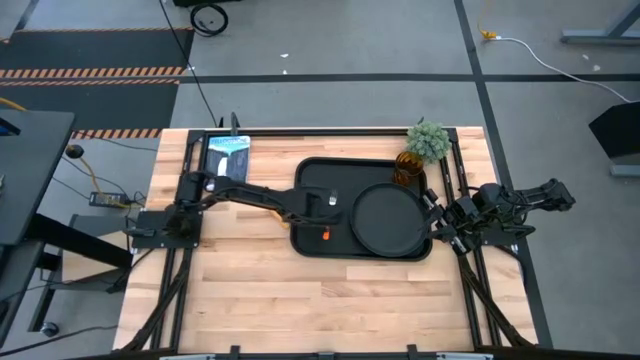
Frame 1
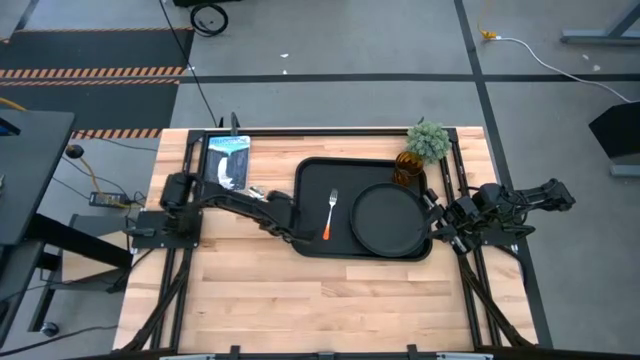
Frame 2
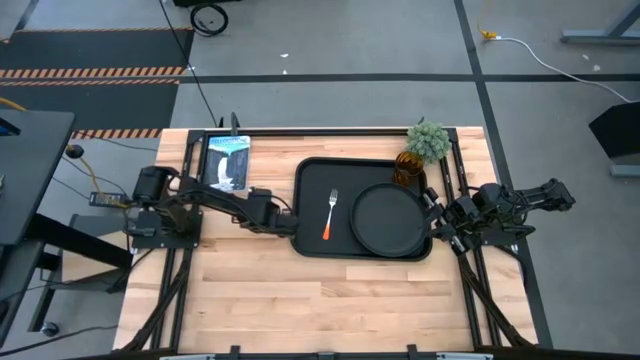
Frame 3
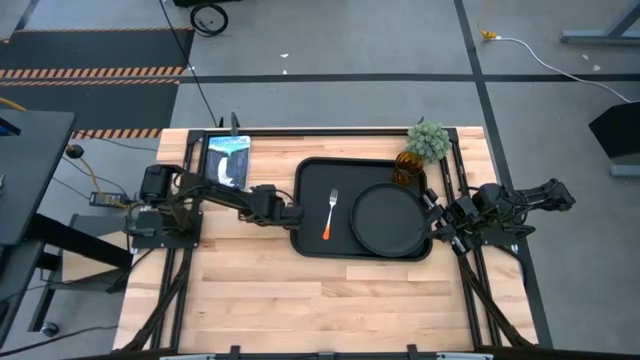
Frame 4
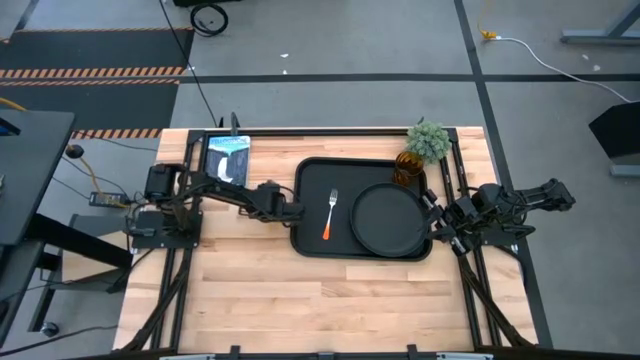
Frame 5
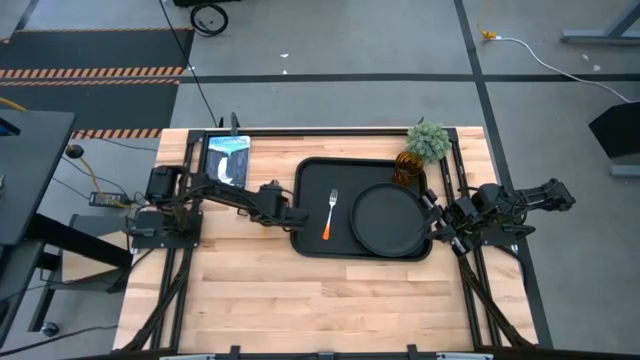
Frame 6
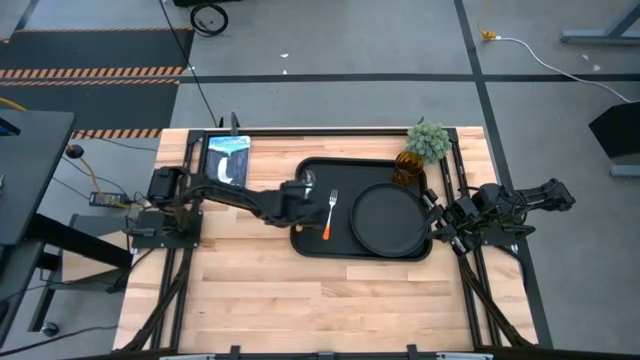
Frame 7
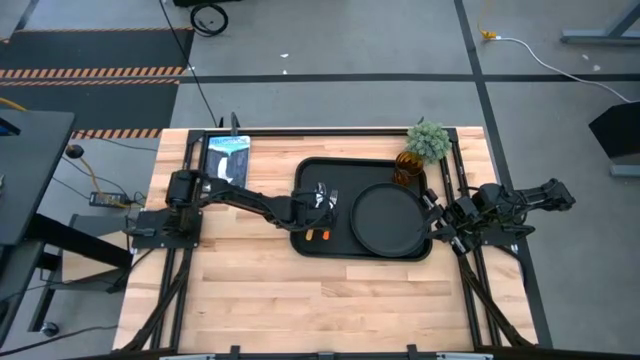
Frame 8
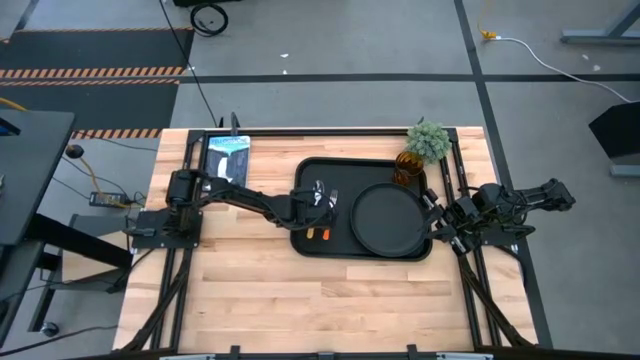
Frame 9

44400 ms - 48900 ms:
Task: Pick and place plate/cup/fork/spoon on tray
Put the yellow spoon to the left of the orange fork on the black table tray

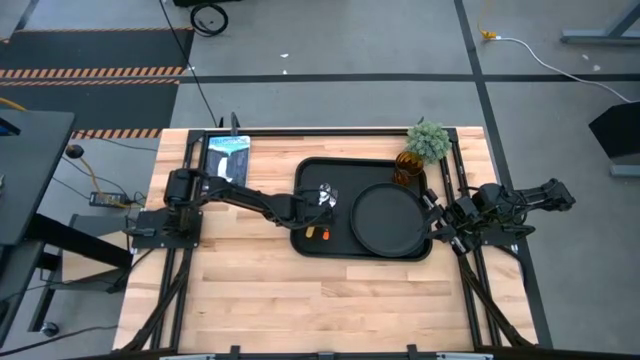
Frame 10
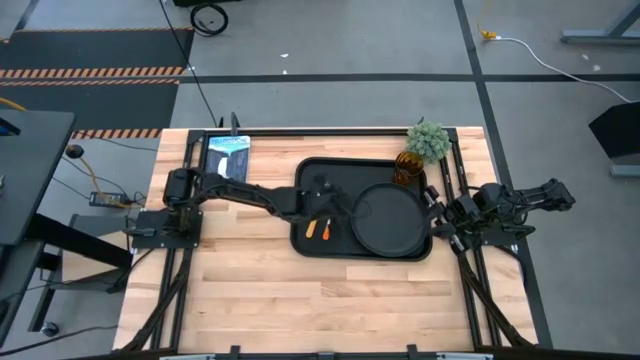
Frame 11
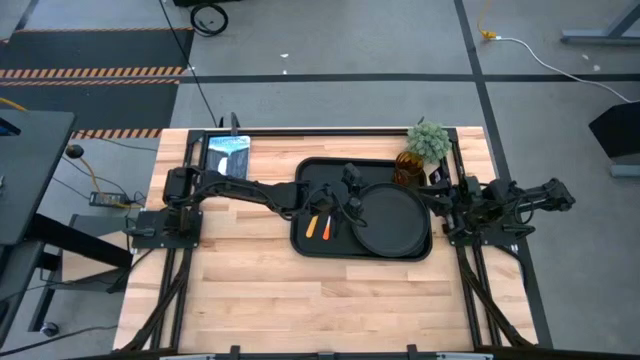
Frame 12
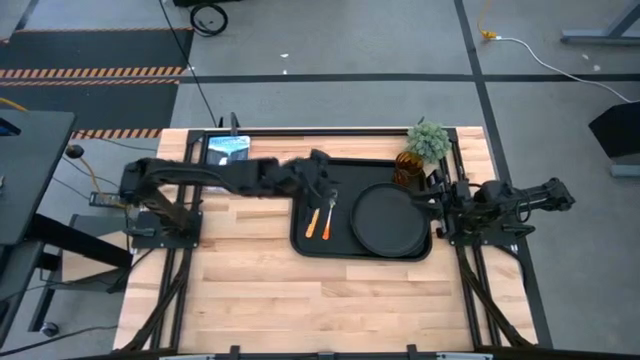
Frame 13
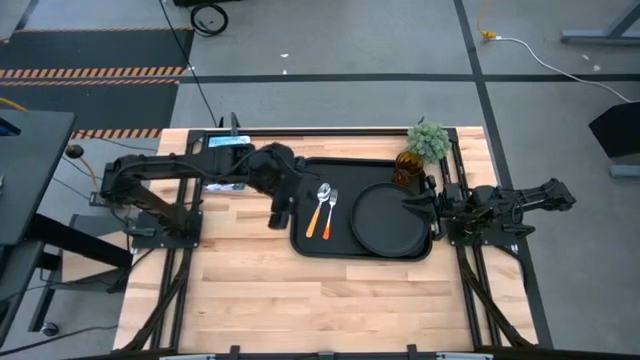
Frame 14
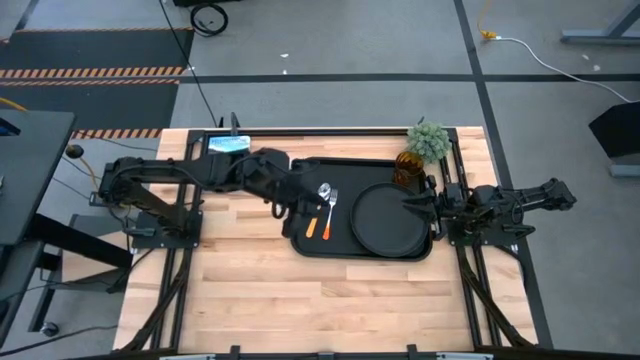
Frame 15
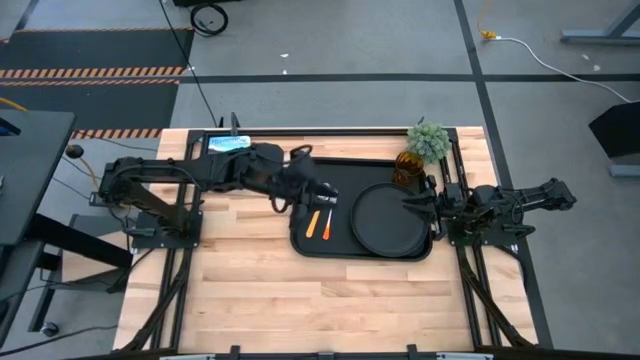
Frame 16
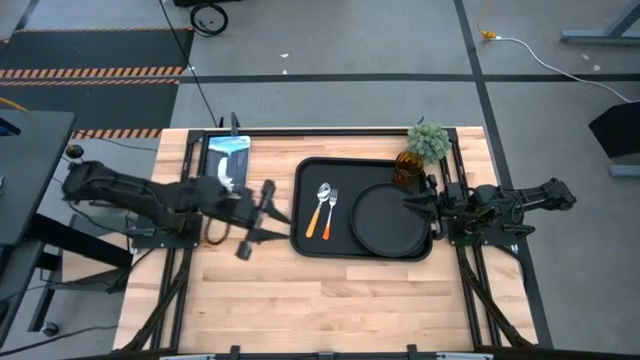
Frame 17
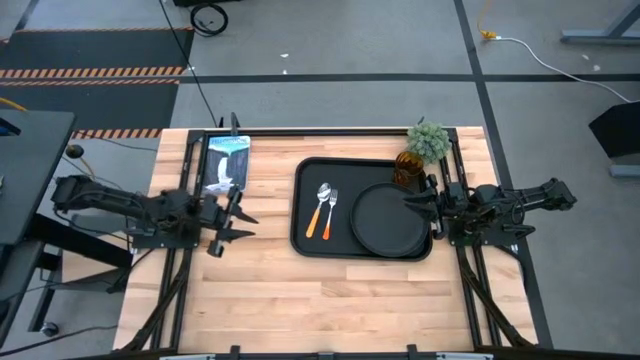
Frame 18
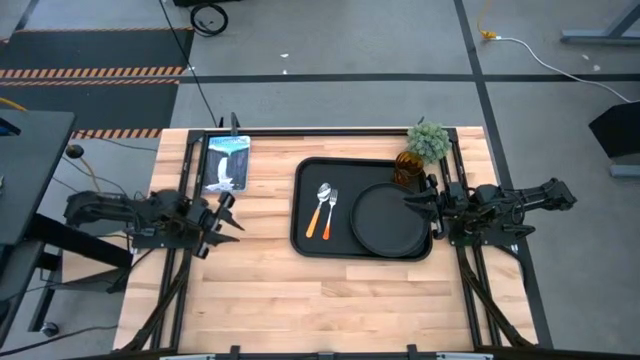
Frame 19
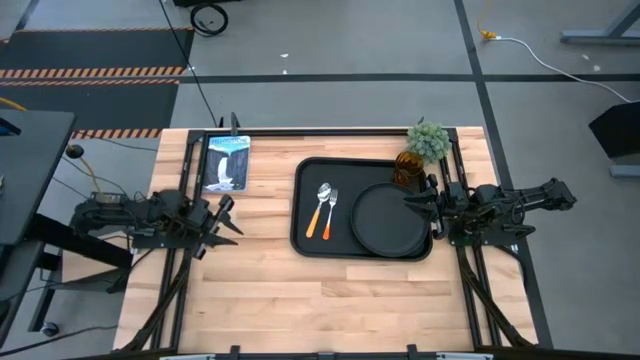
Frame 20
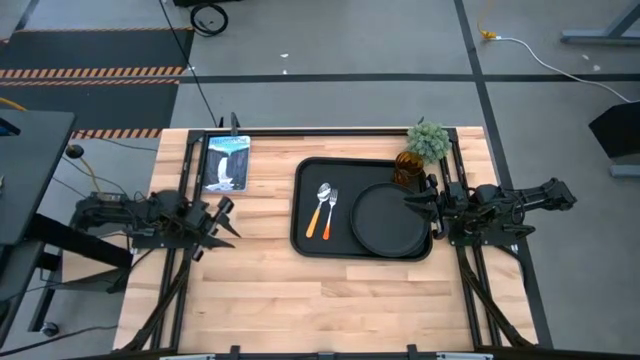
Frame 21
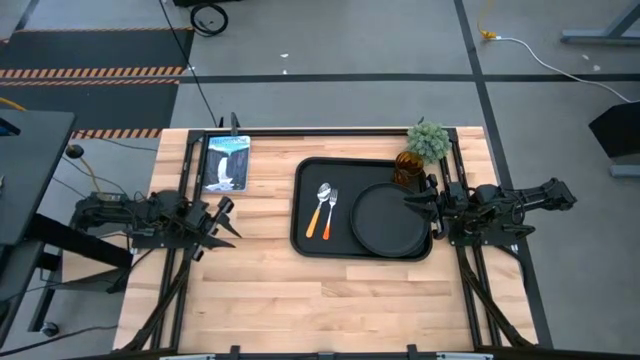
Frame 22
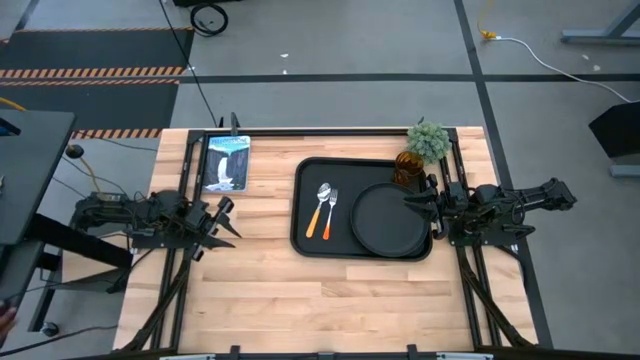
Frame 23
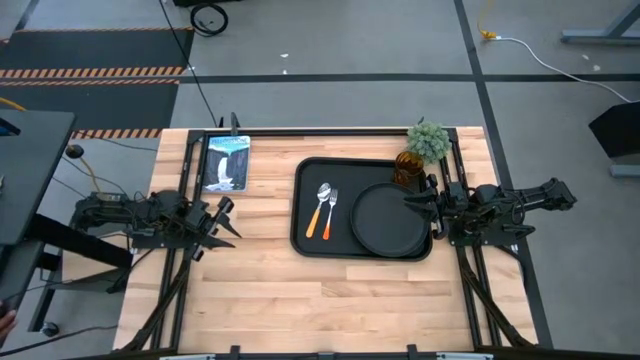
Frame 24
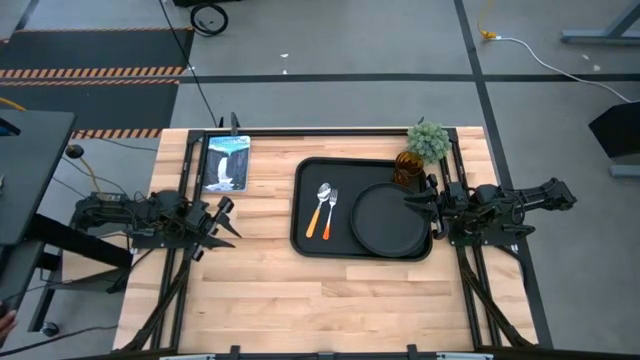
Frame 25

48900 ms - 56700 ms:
Return to Home Position

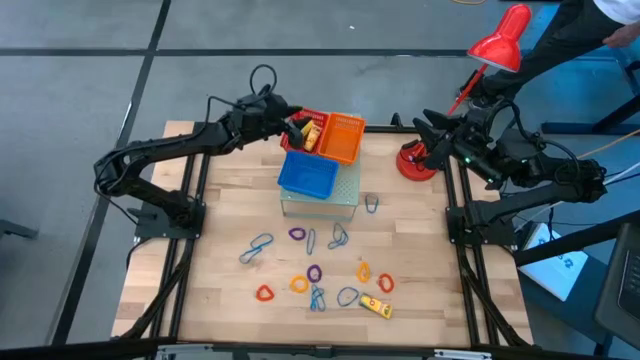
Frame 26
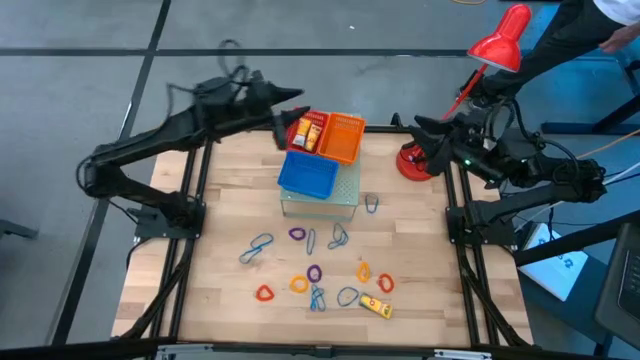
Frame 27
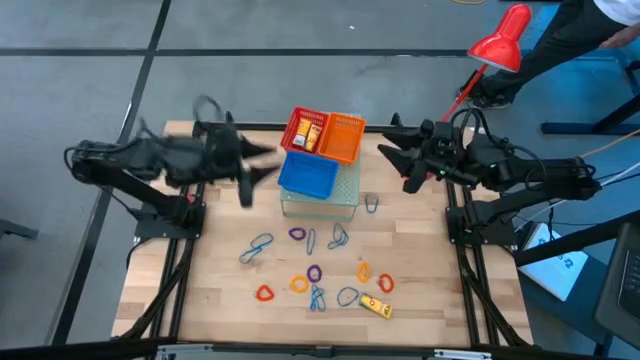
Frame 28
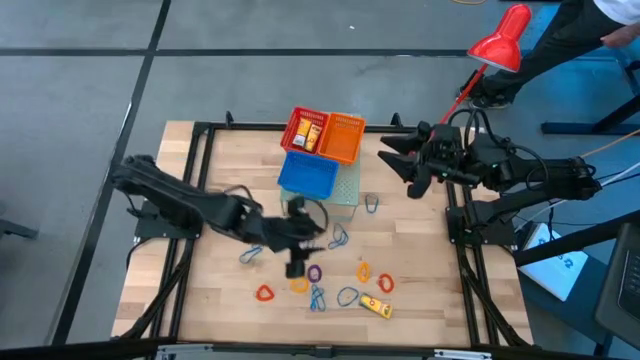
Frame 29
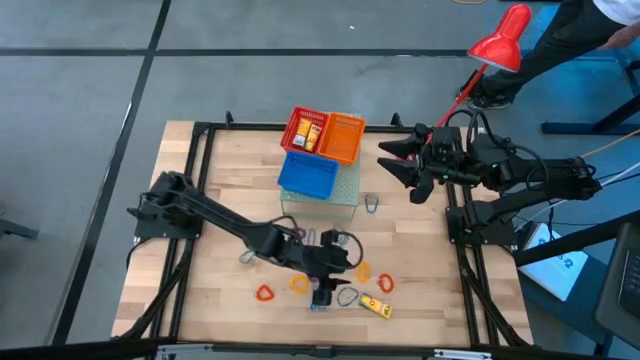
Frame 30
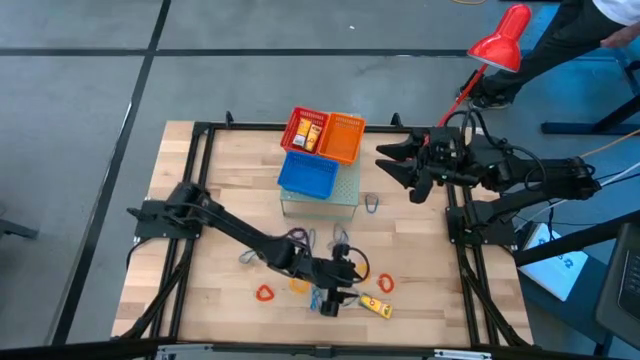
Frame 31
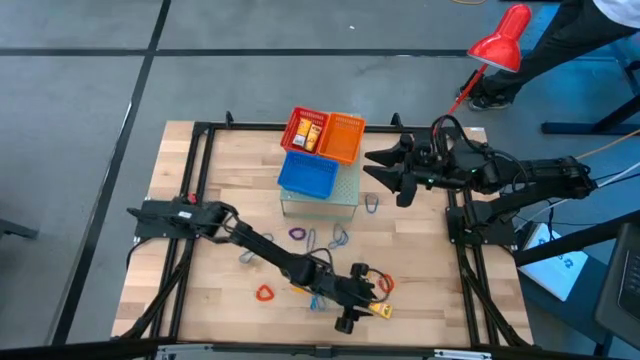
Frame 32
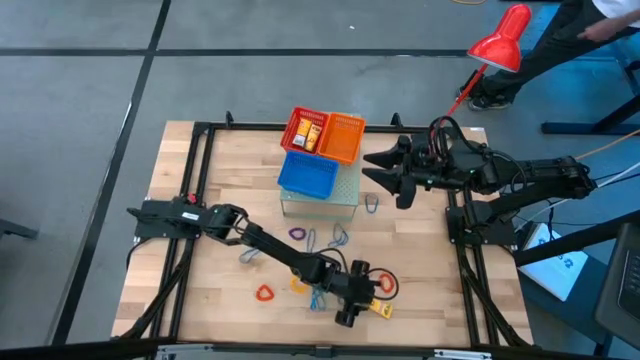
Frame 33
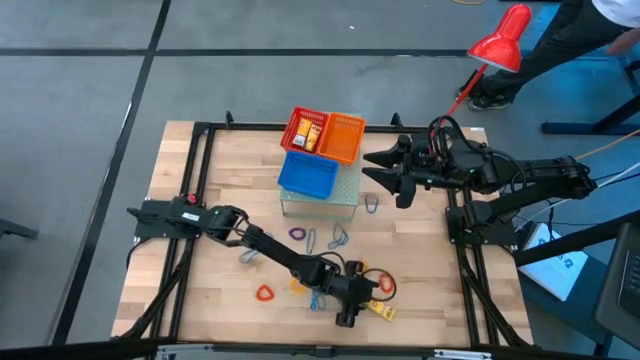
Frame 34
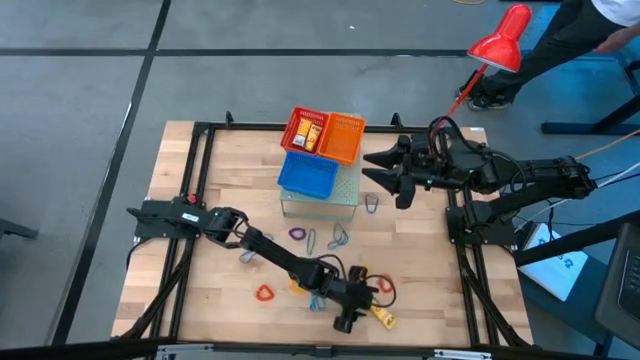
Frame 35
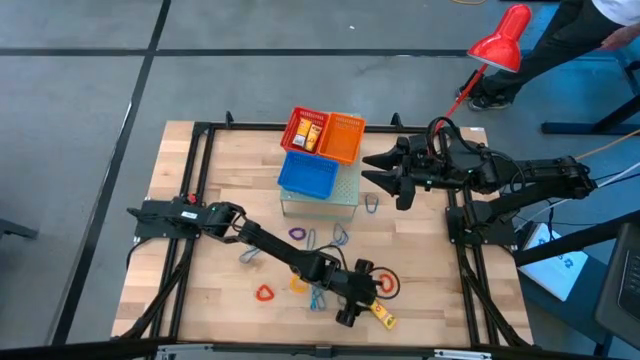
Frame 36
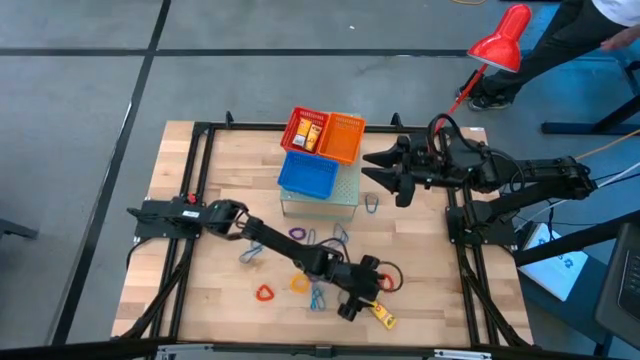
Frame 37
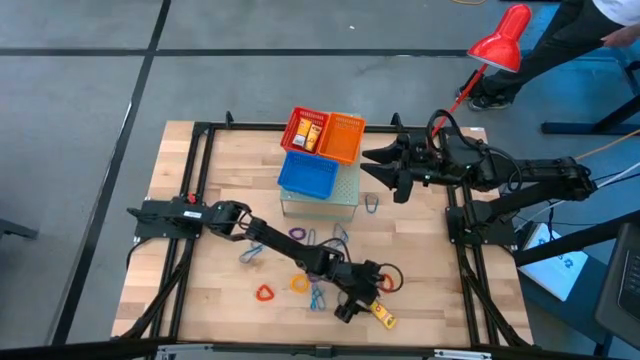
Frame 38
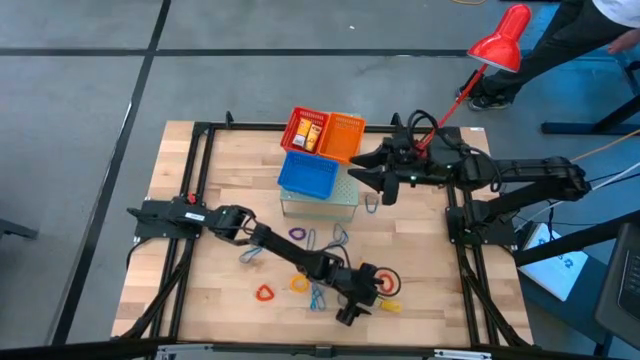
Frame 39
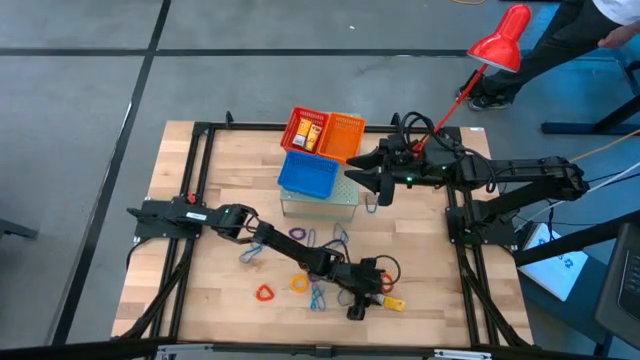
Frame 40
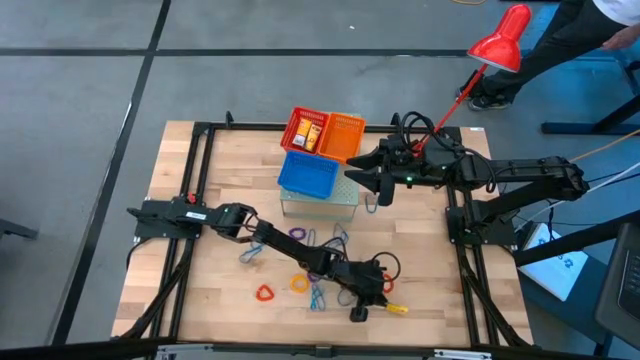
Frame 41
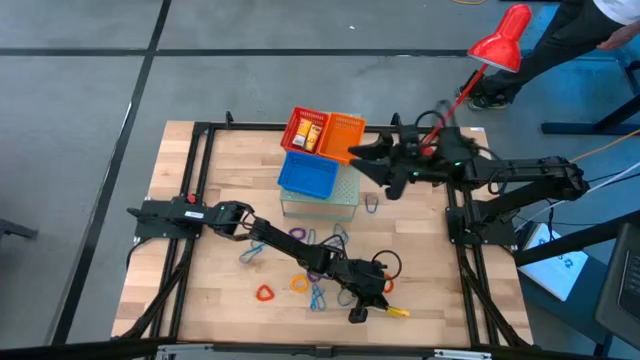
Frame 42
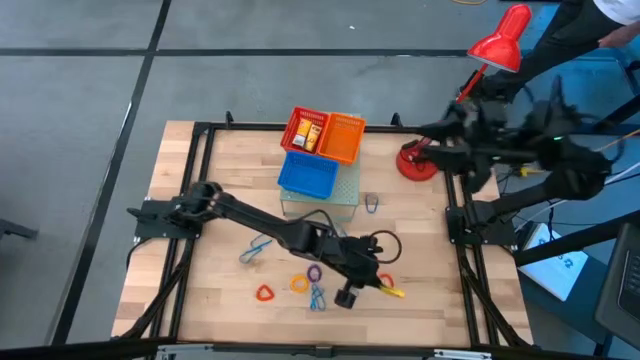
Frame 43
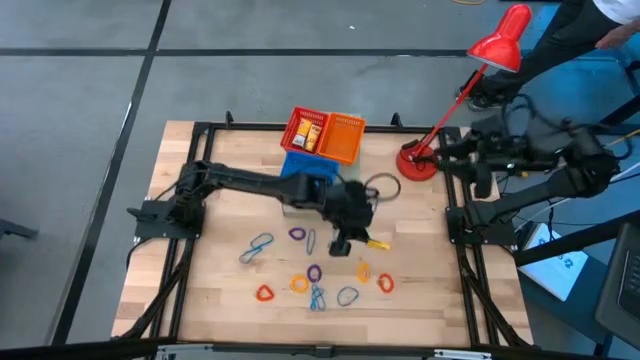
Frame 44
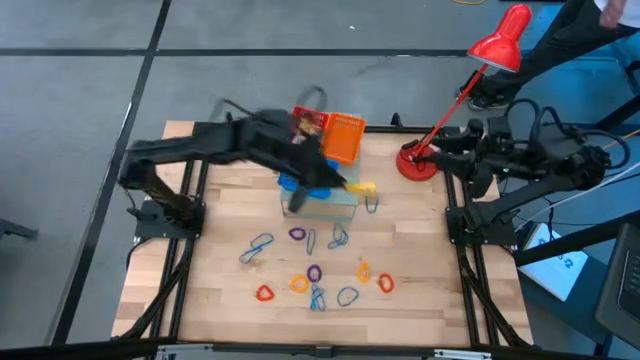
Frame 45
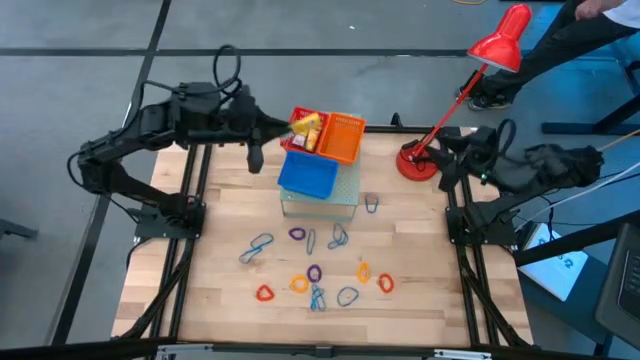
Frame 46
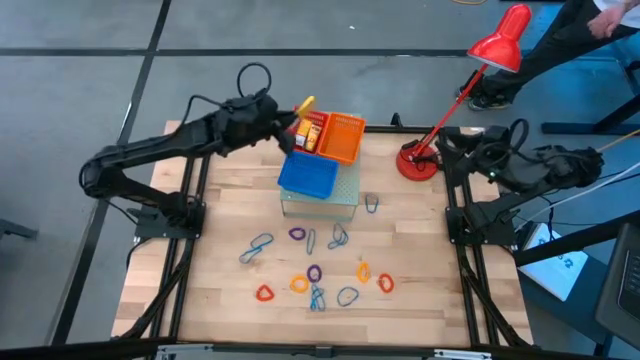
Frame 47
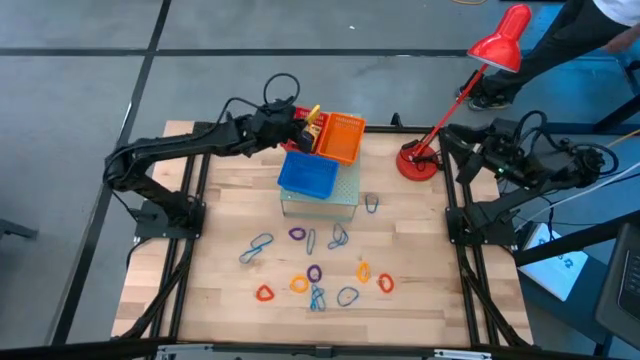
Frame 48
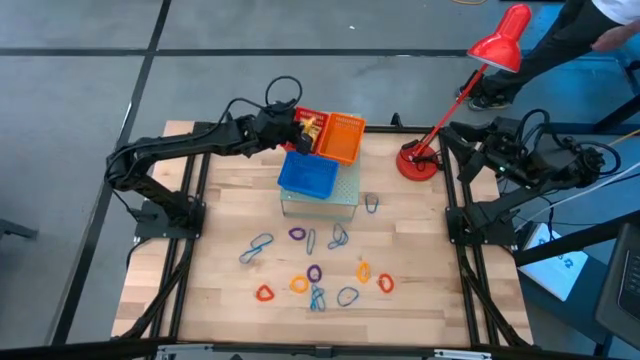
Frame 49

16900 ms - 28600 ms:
Task: Pick & Place Office Desk Supplies
Put the crayon box into the red basket on the shelf
